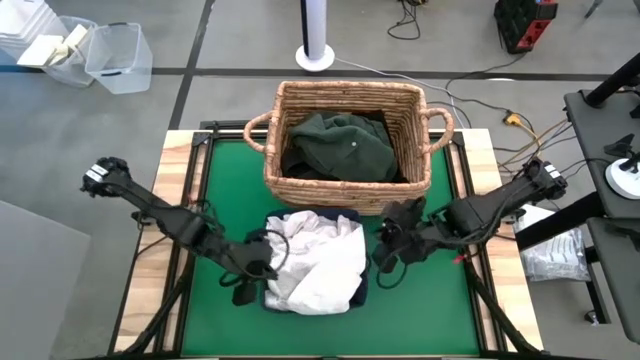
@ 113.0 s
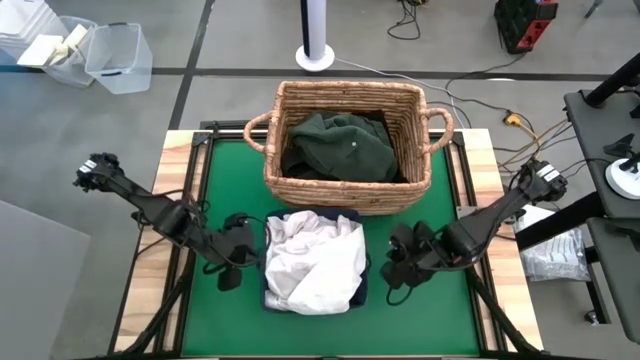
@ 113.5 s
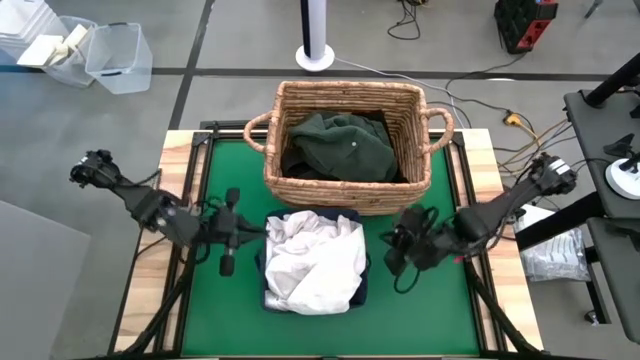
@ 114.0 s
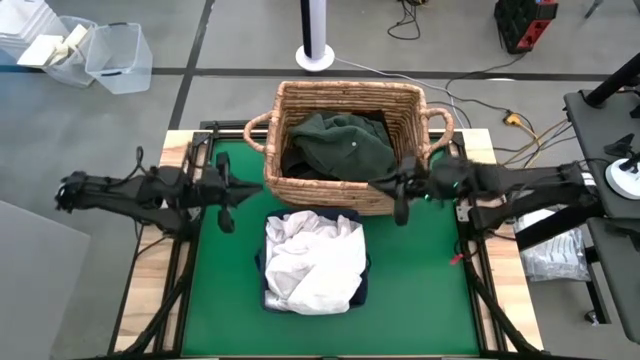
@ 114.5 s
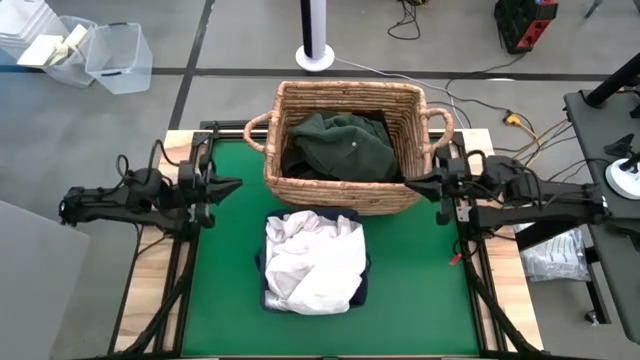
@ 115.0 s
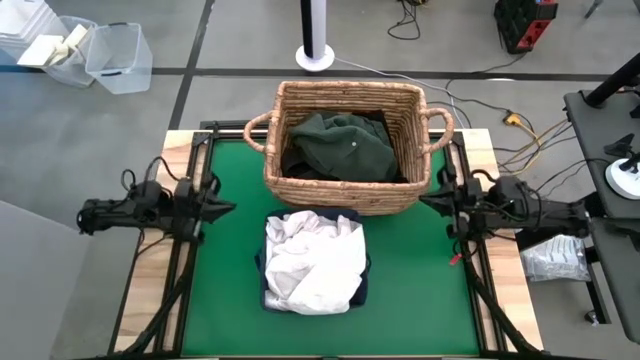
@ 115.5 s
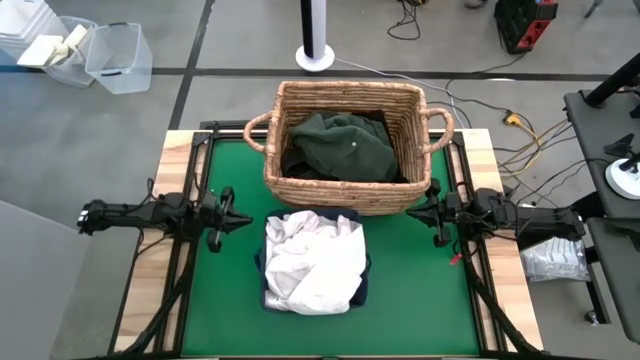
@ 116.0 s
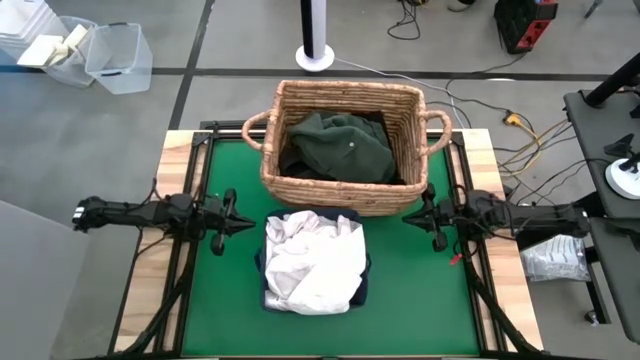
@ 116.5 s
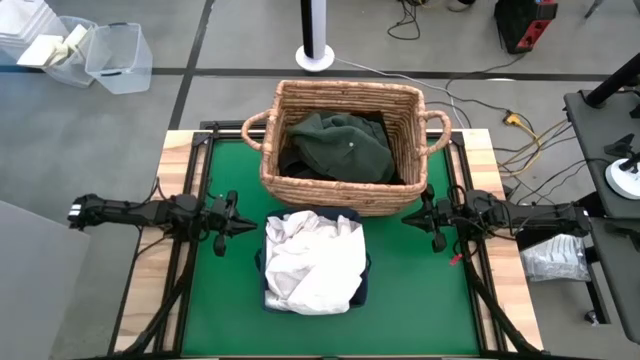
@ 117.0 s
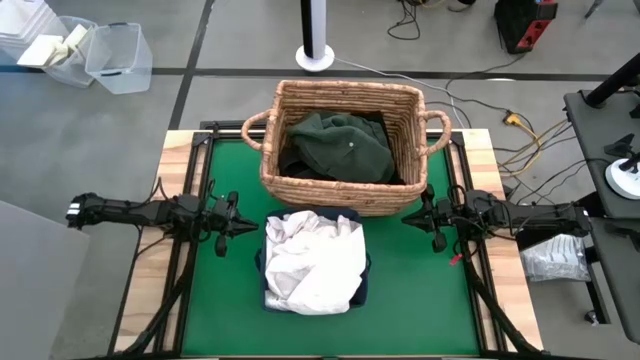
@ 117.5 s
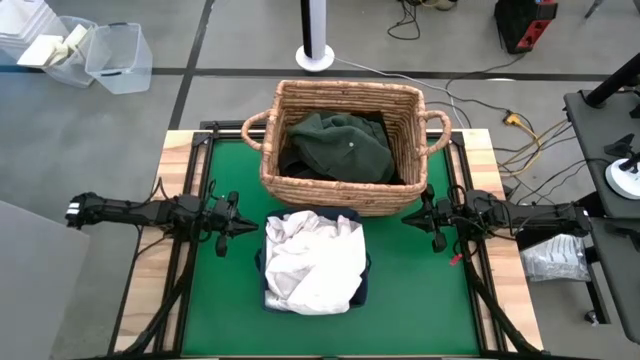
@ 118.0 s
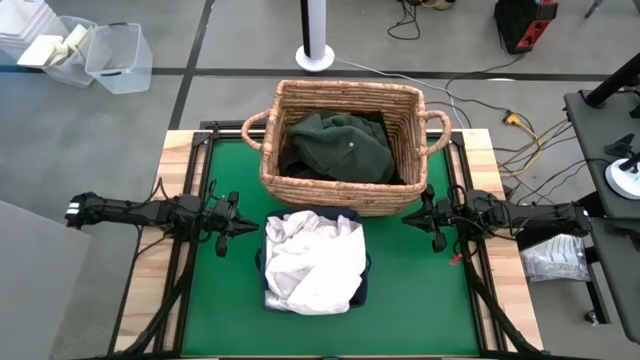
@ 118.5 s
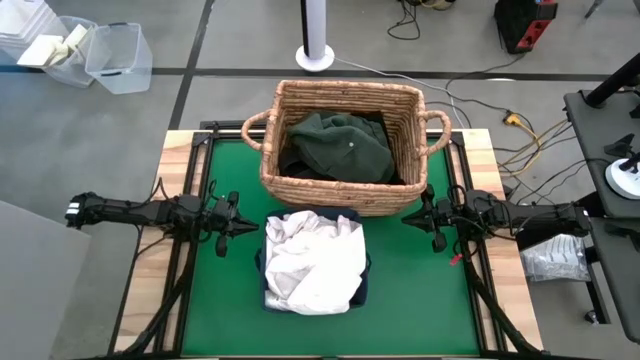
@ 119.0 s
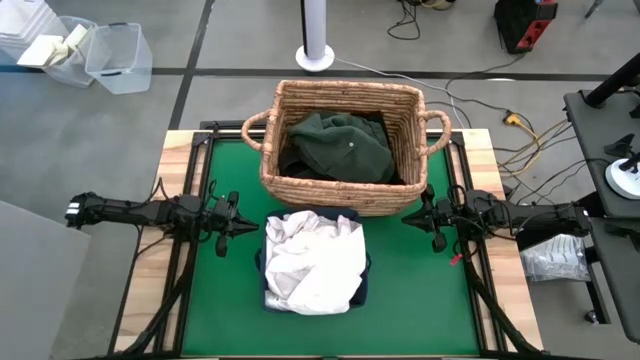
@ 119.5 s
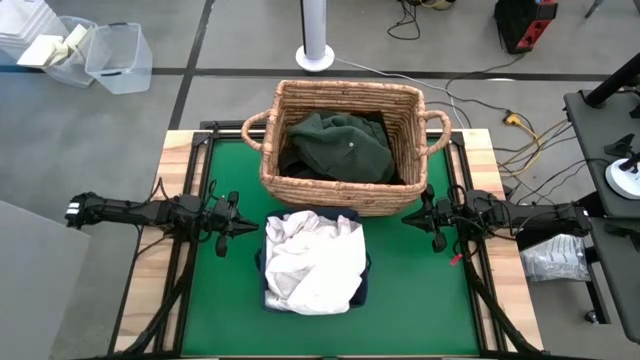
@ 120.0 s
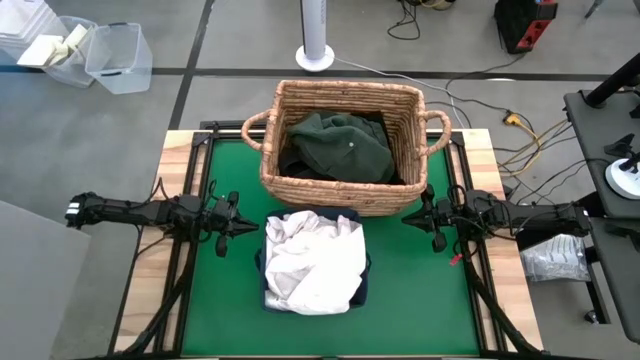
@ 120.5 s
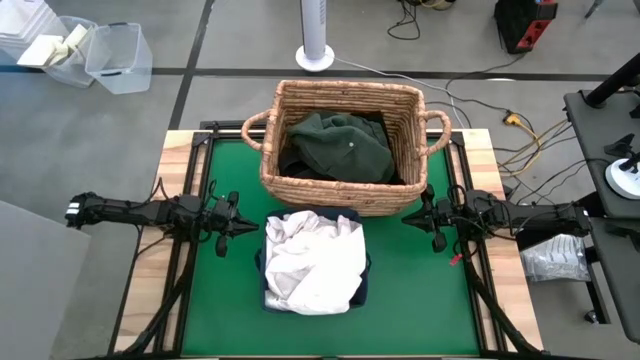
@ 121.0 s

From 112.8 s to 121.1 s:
Return to Home Position

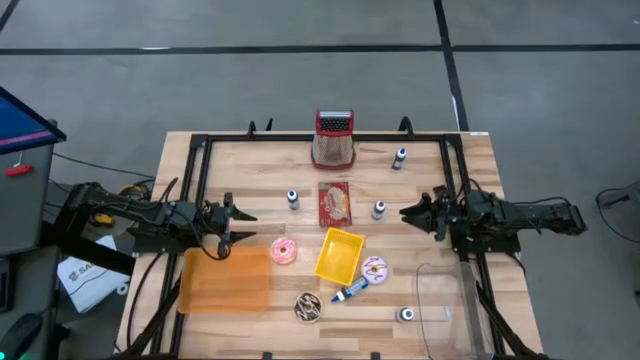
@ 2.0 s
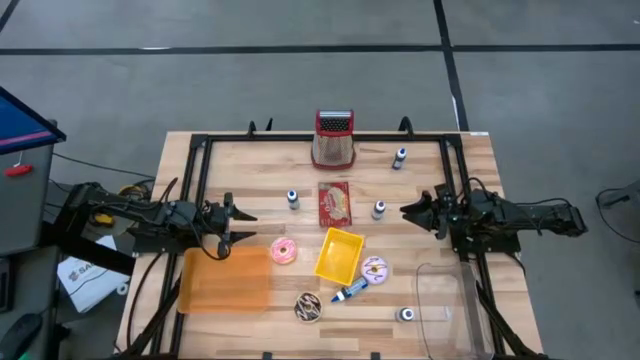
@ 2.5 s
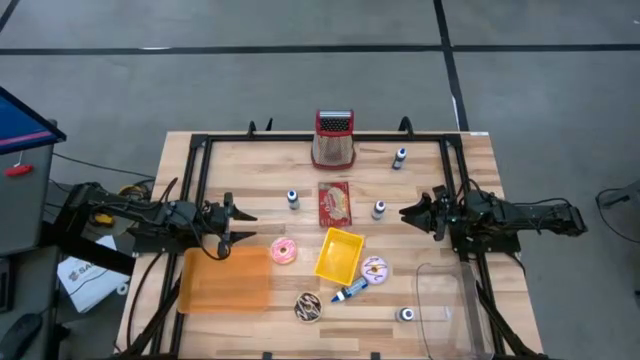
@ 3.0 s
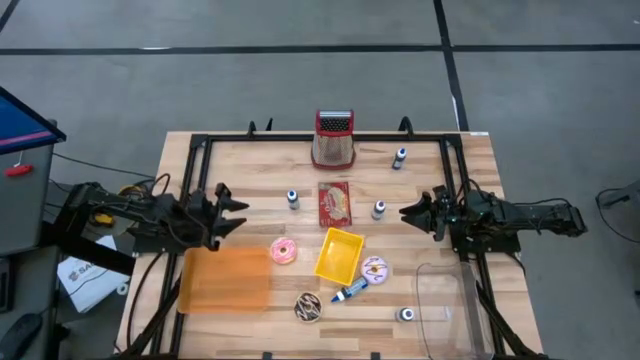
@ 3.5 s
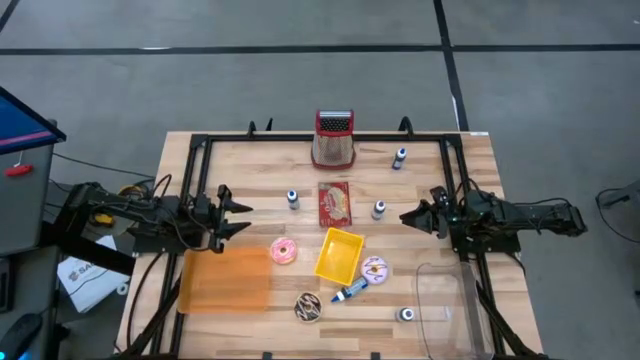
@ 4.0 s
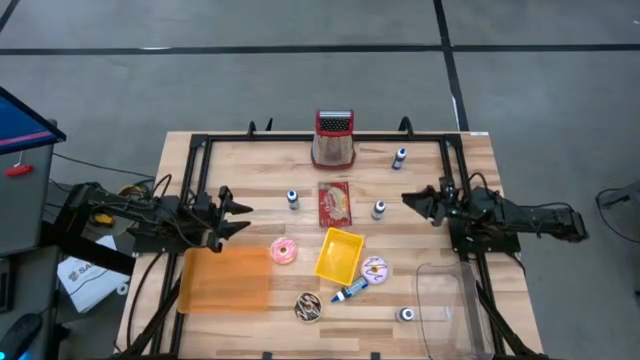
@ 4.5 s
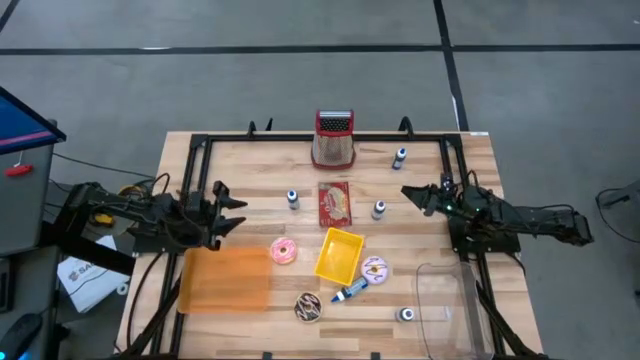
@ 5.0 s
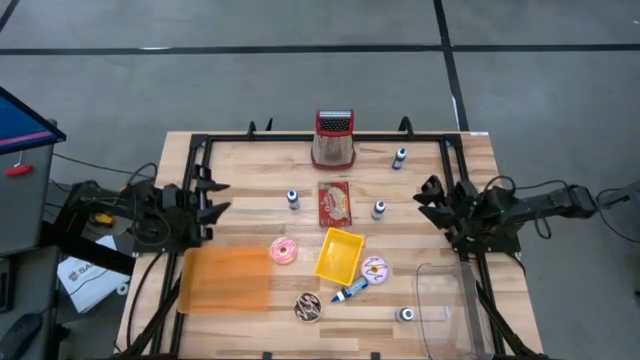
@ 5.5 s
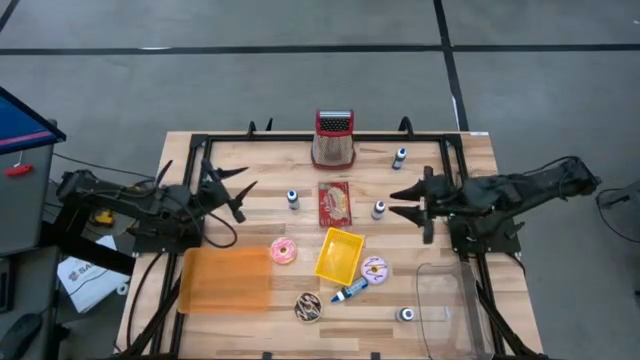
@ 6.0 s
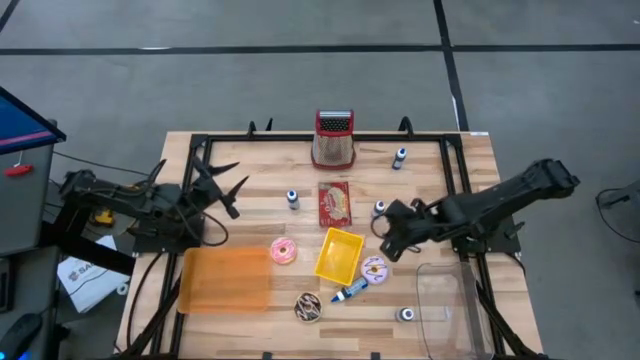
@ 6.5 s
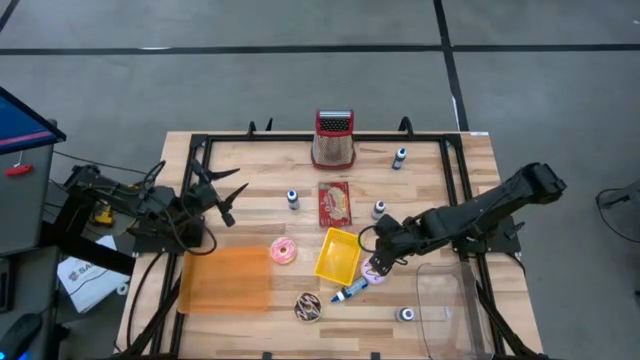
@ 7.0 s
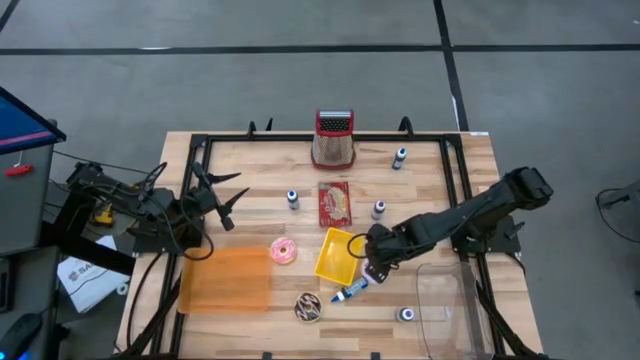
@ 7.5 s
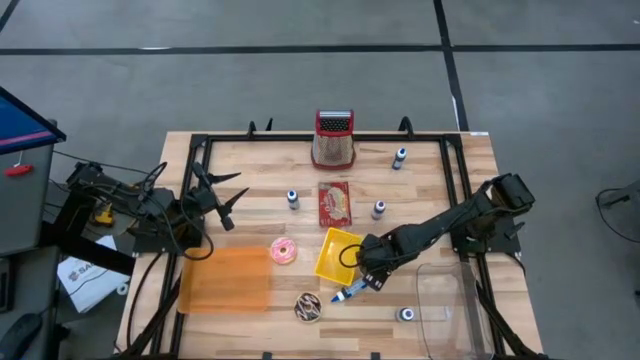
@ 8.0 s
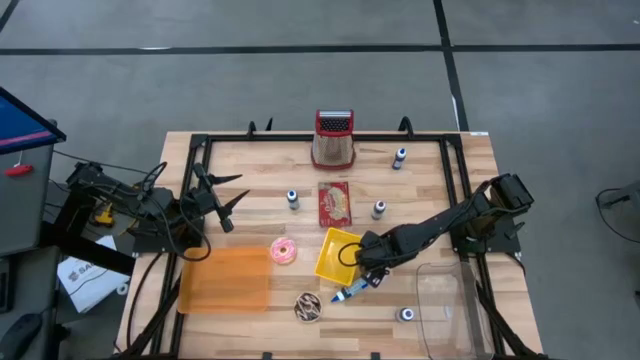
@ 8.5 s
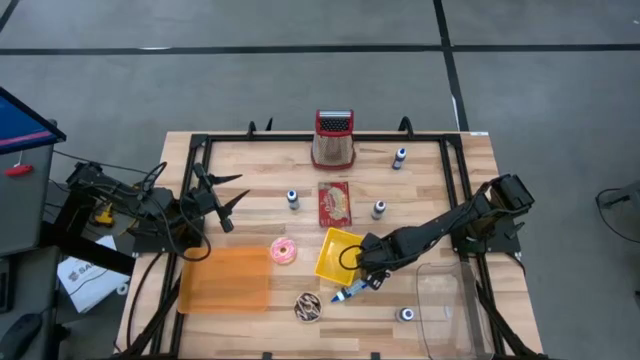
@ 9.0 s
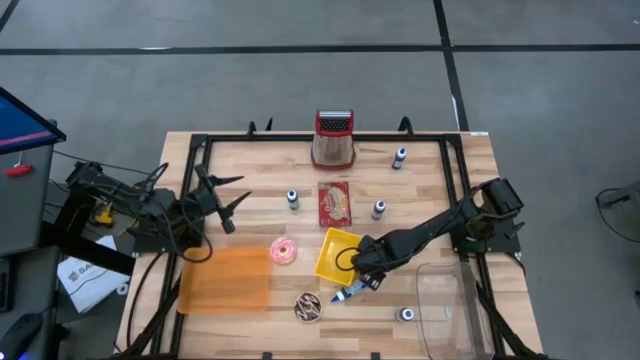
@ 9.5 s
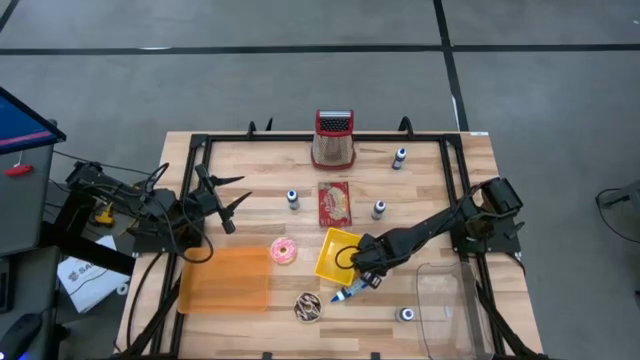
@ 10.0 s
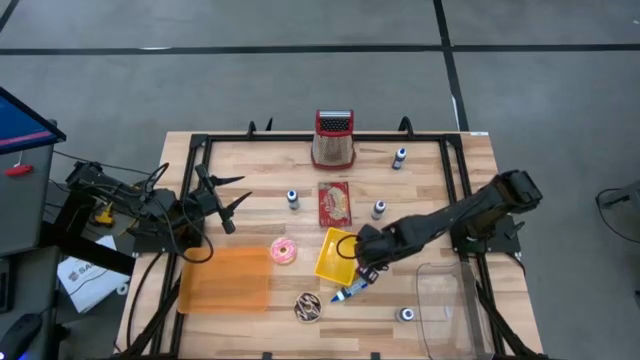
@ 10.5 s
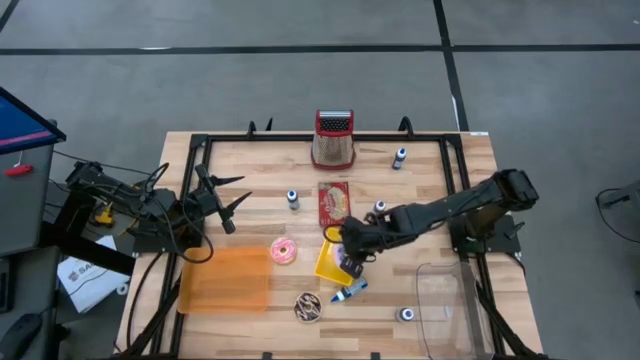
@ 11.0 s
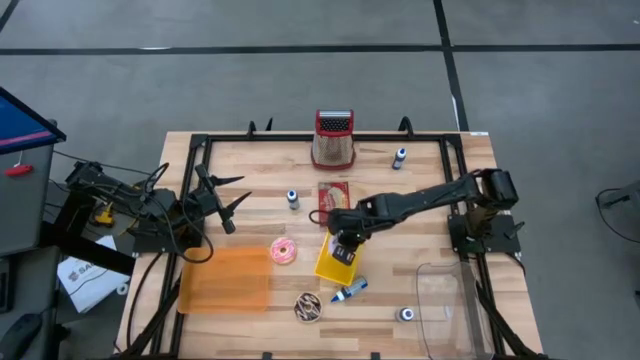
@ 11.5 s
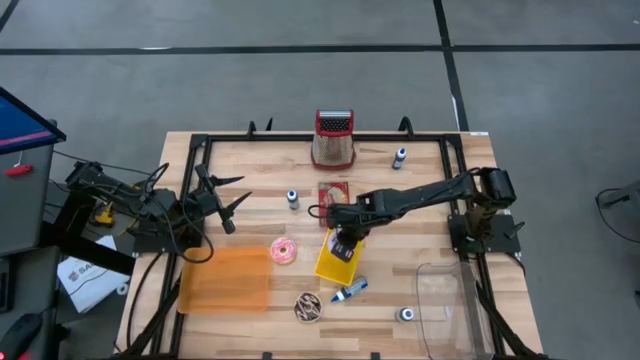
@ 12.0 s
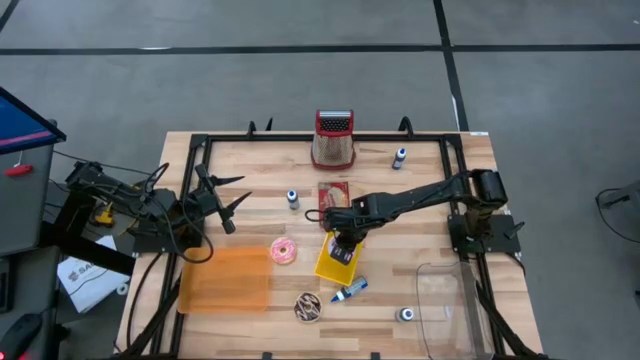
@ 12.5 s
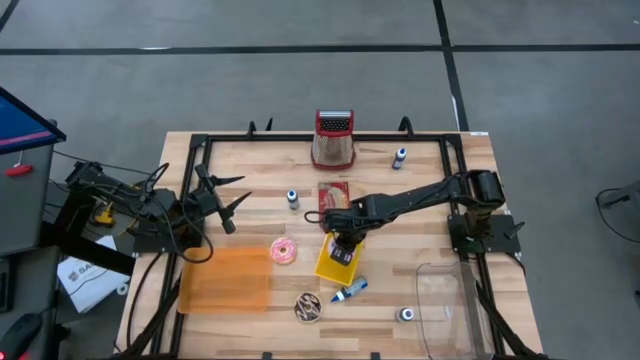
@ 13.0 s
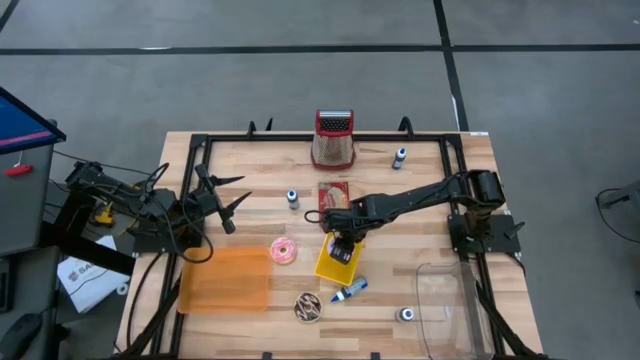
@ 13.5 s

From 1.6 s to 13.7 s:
Put the violet donut into the yellow basket
